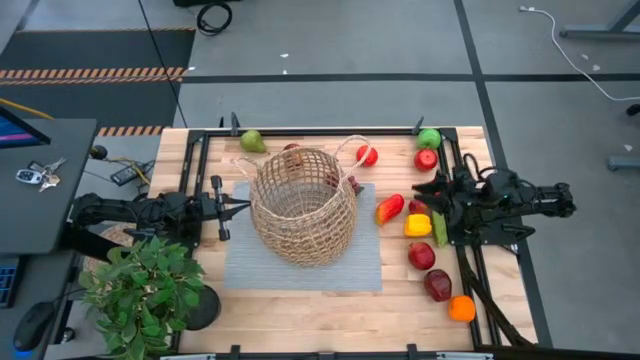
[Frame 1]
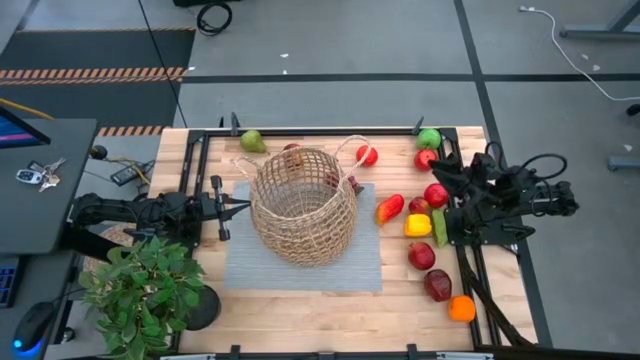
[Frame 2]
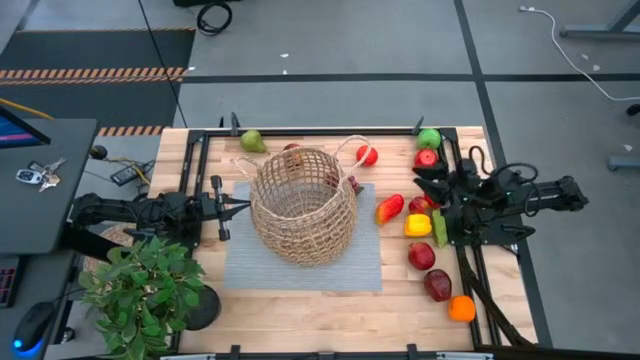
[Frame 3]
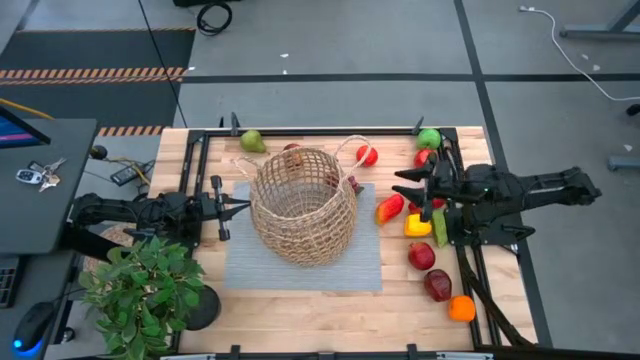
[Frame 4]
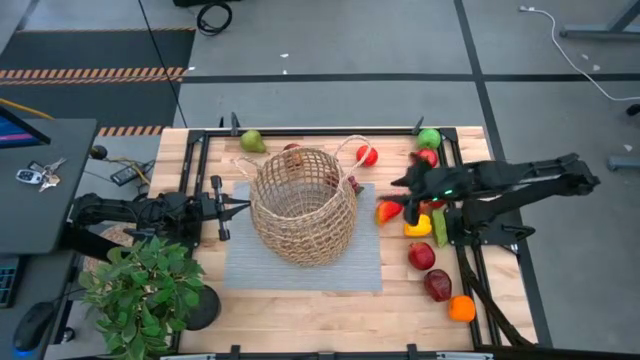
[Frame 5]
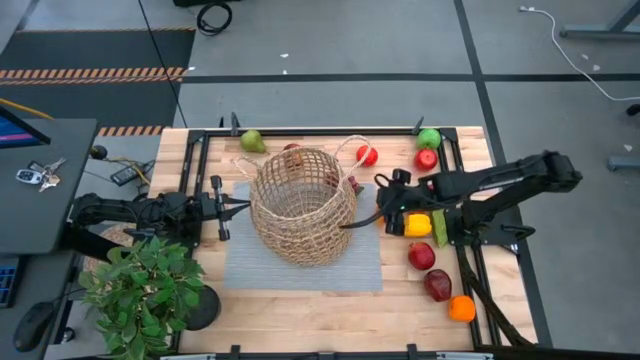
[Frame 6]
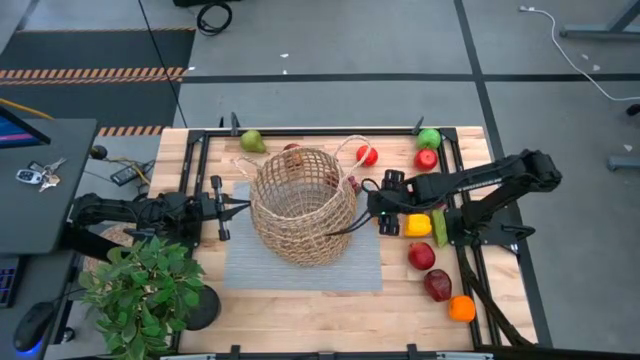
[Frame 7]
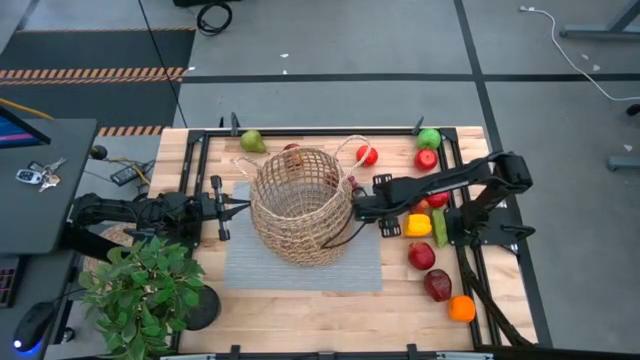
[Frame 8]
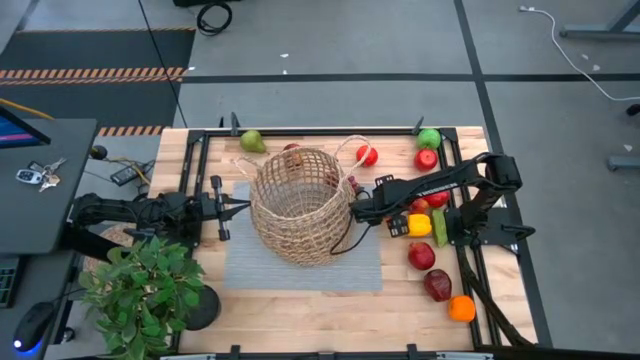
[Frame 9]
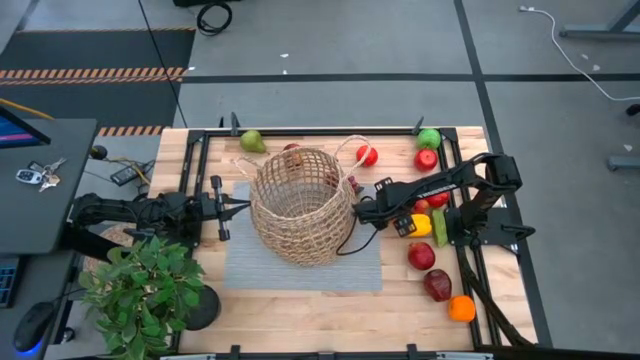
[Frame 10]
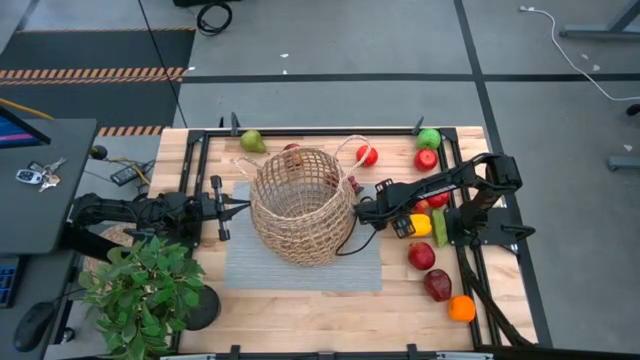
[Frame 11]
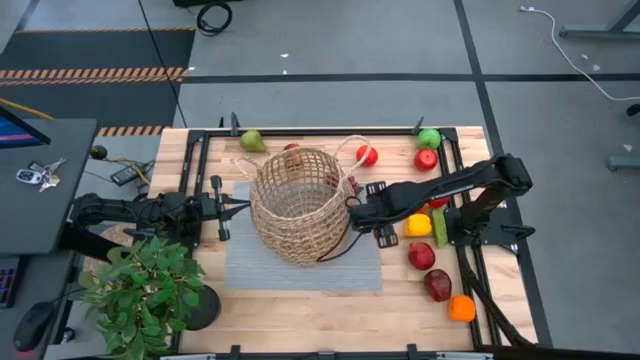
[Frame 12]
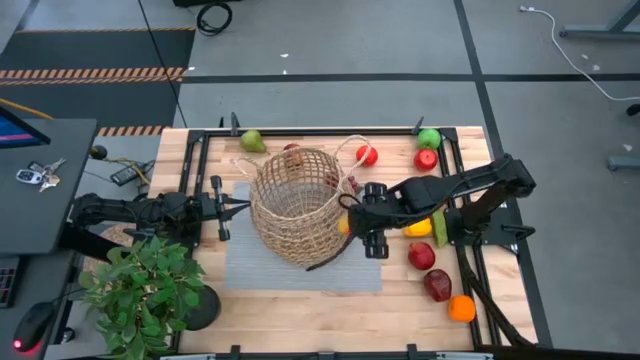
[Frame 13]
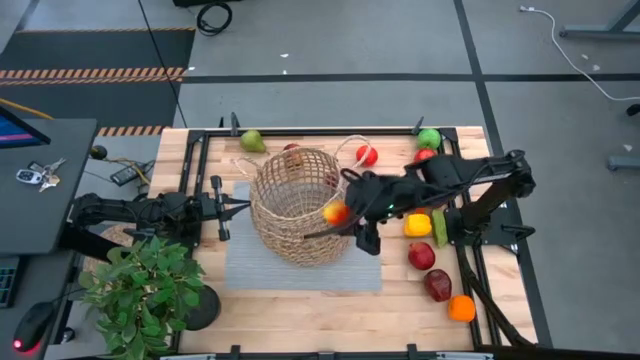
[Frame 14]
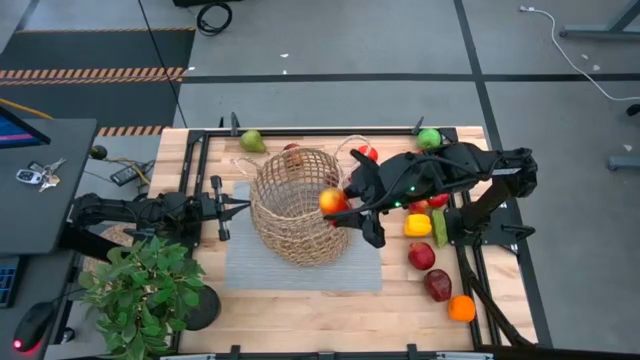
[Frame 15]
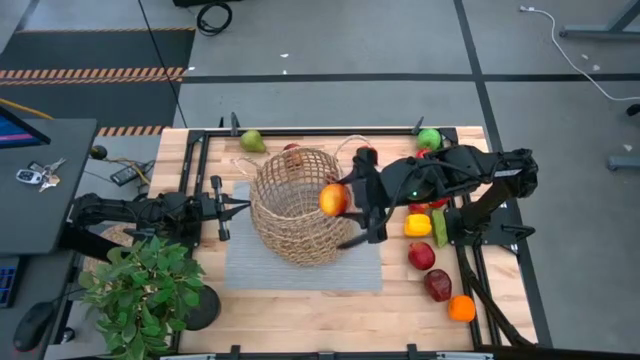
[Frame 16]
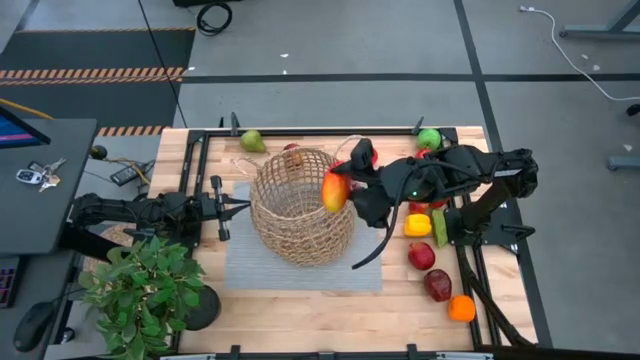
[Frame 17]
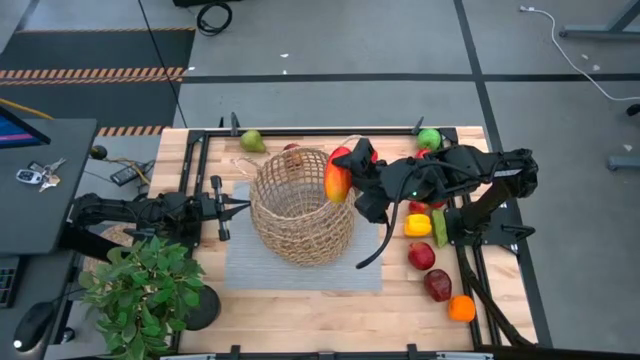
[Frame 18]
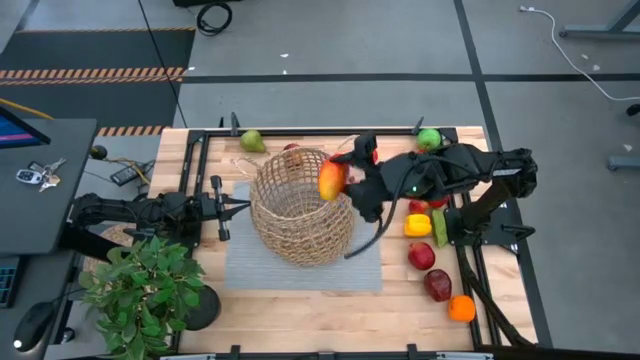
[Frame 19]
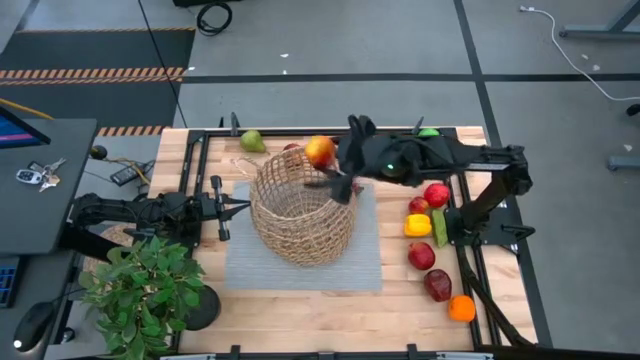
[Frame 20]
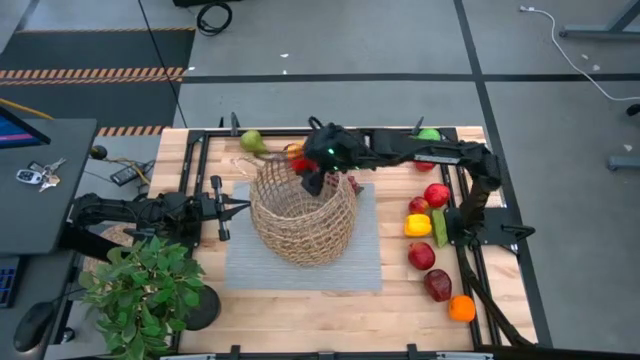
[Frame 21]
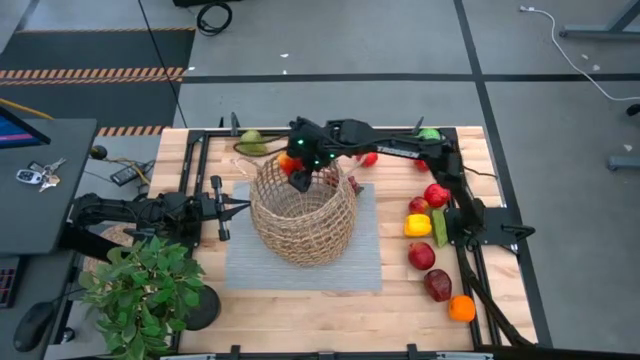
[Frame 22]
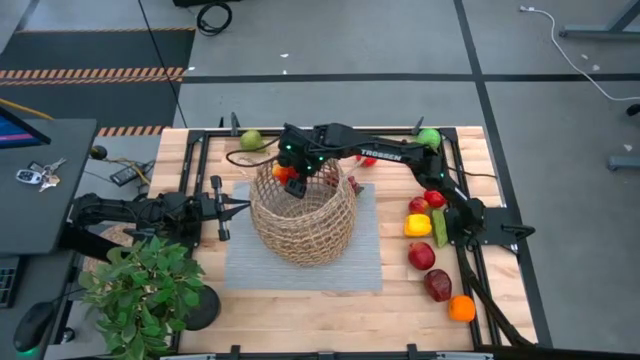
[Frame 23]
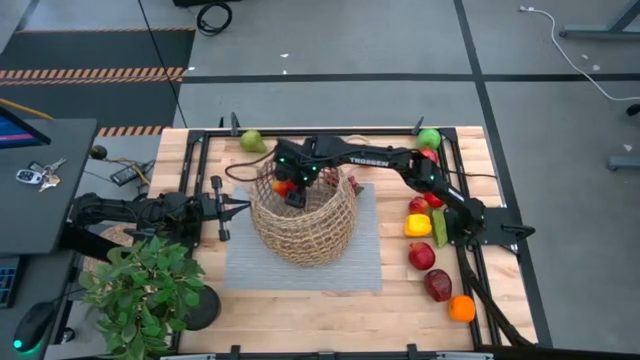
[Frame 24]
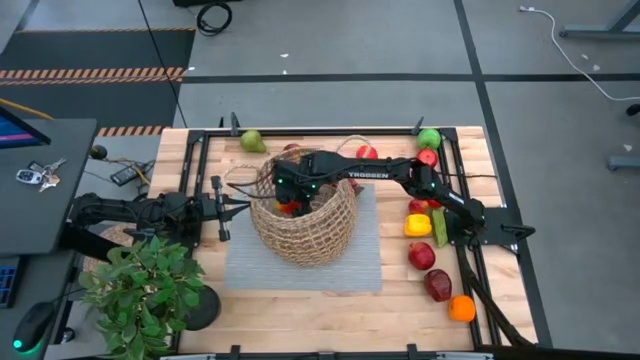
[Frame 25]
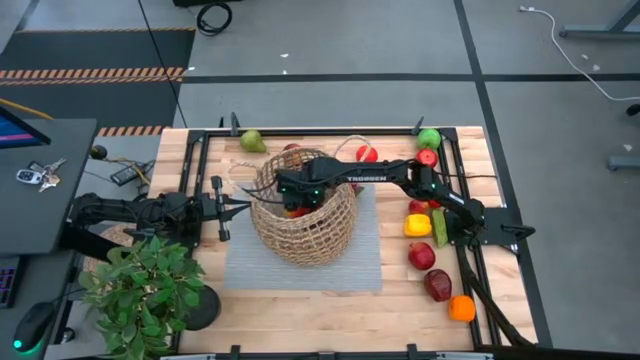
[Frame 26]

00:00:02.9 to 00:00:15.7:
Task: Build produce basket
Put the red mango into the brown basket

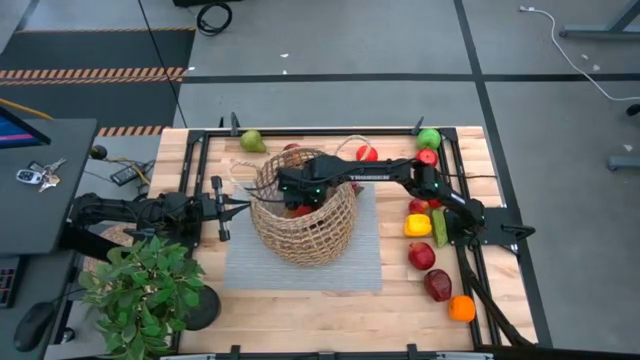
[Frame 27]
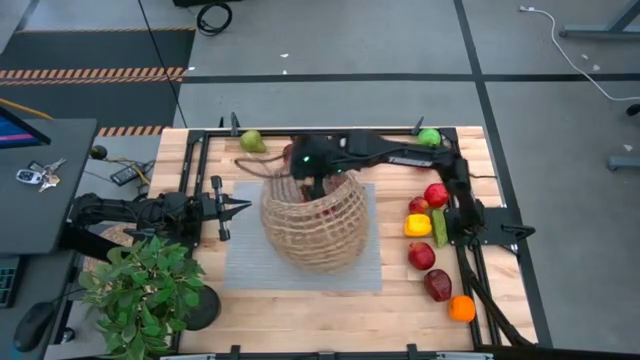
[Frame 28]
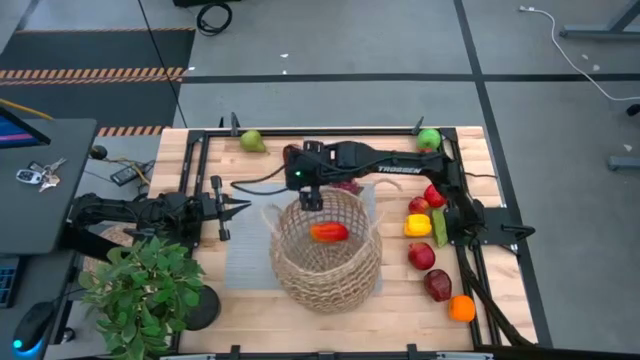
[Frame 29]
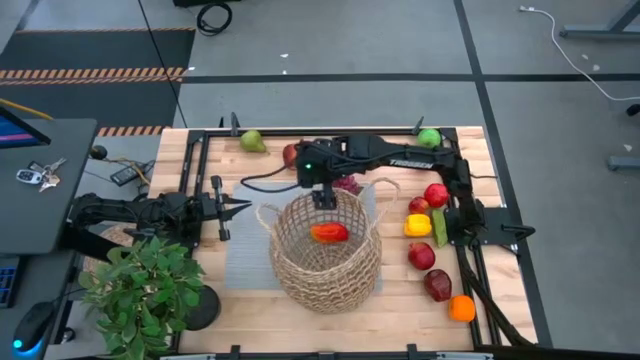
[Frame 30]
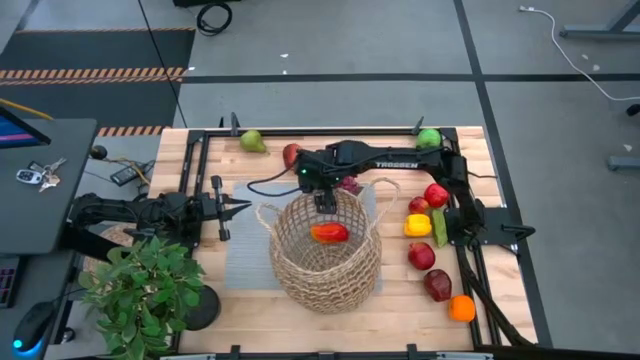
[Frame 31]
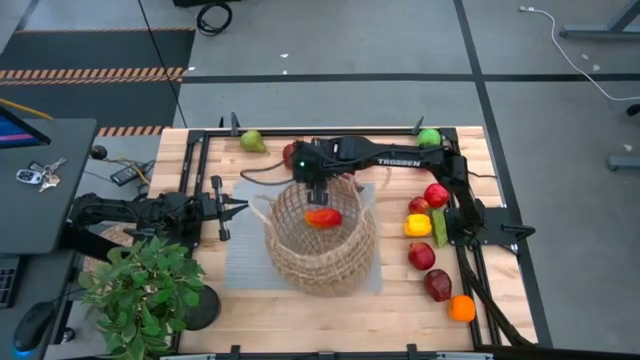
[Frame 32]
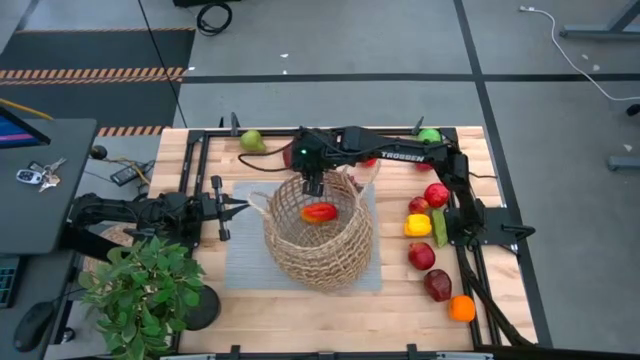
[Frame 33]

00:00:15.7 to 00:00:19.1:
Adjust the brown basket

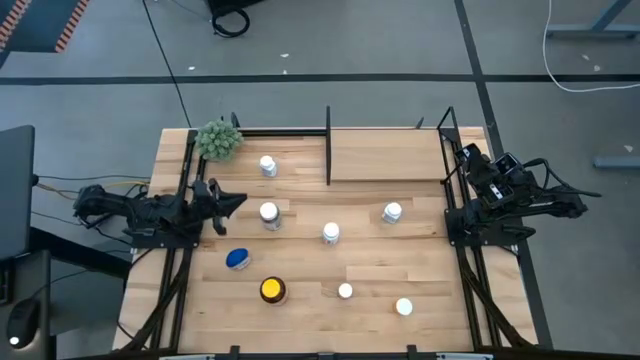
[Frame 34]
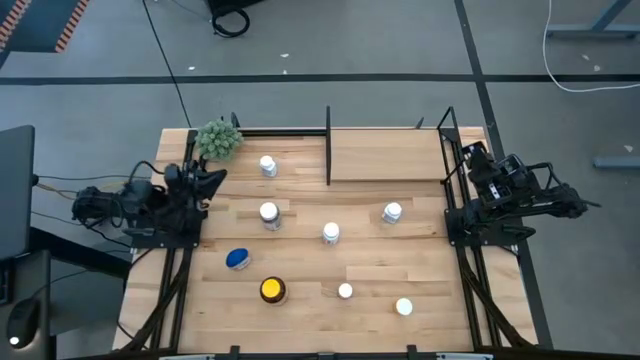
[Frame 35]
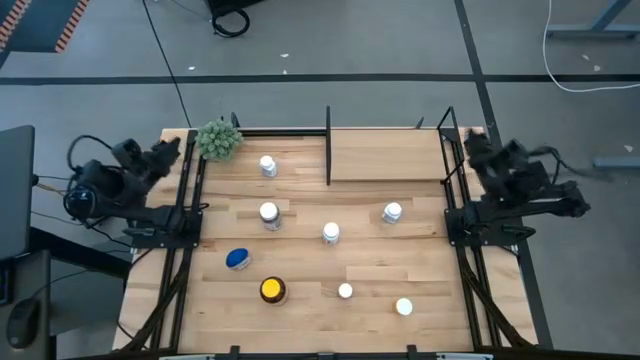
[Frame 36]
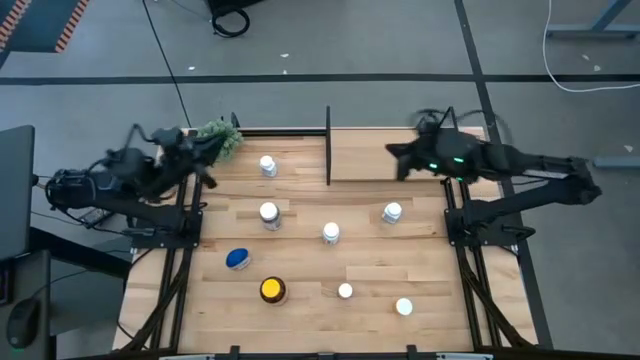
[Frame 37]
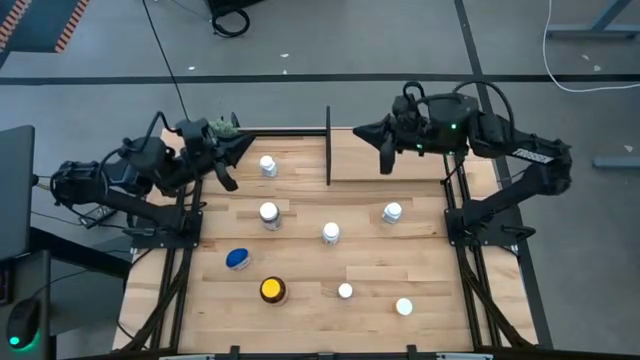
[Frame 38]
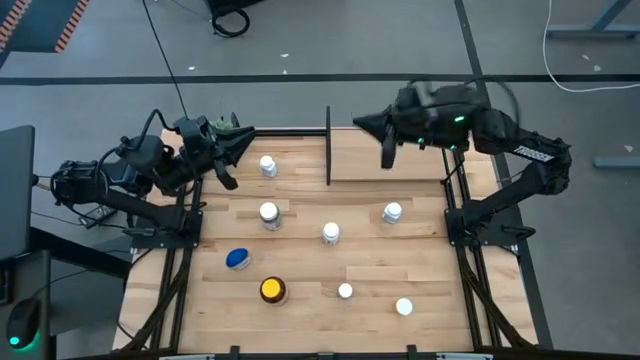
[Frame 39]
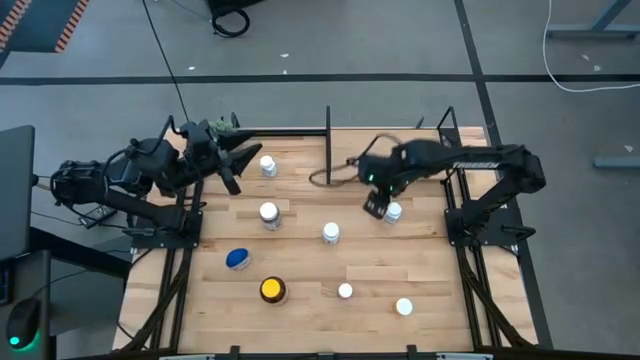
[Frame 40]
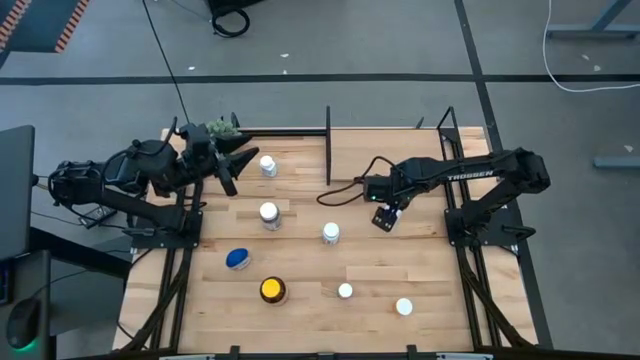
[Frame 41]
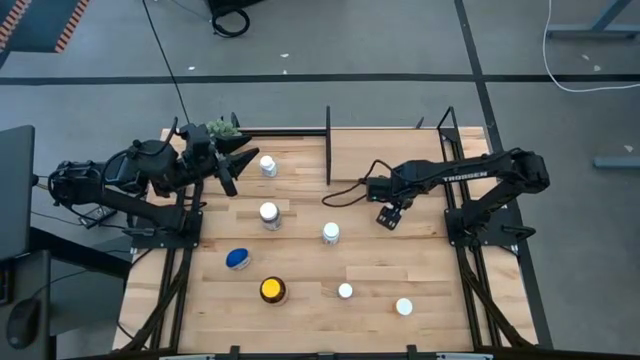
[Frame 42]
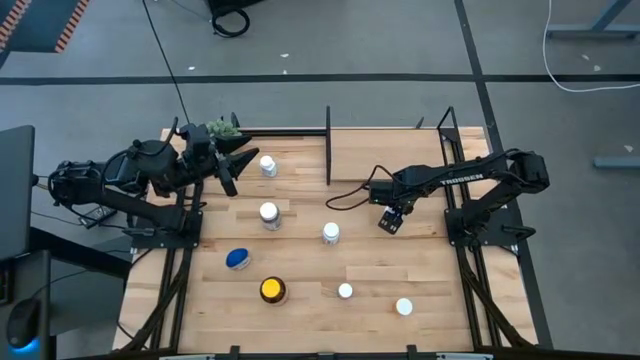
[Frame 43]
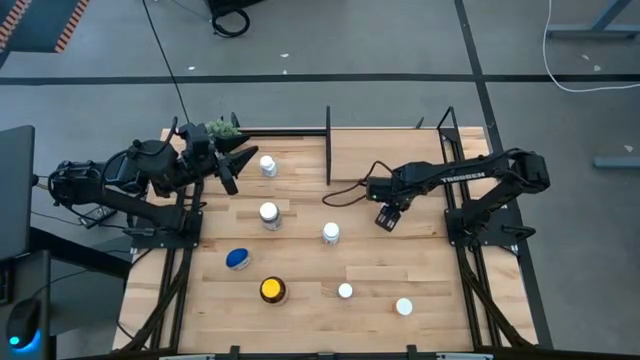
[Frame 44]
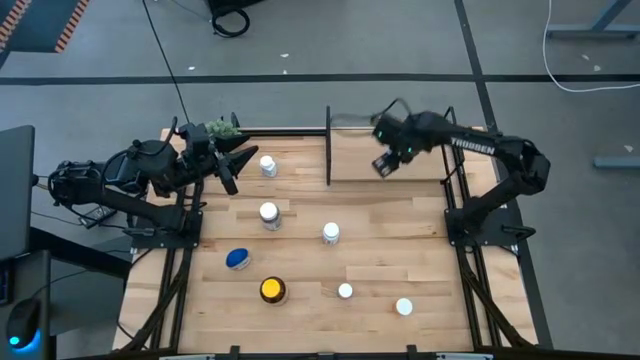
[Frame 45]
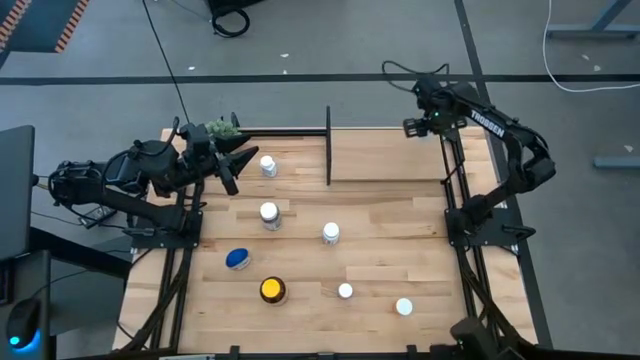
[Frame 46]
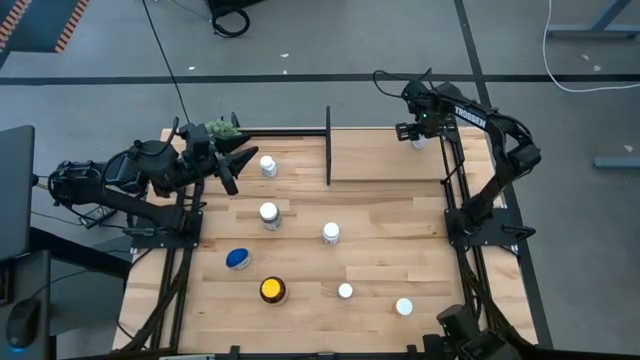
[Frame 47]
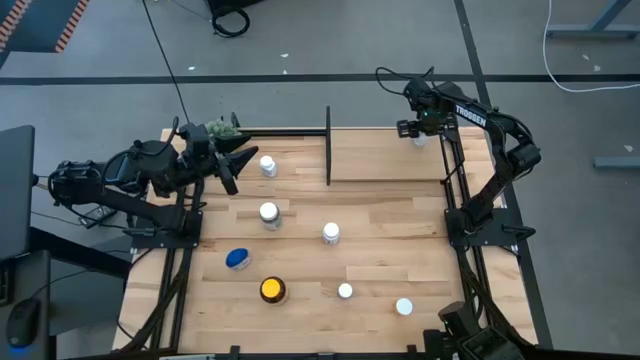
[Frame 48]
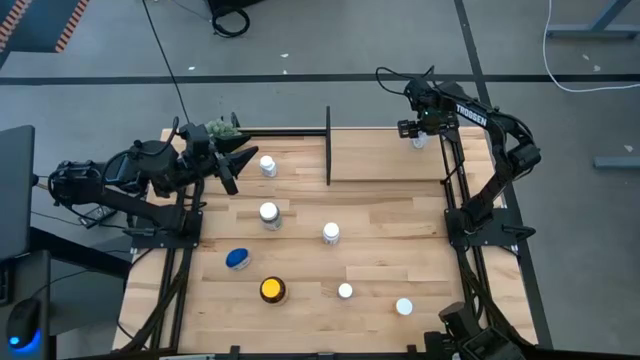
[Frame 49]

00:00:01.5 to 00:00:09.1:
Task: Pick and place medicine bottles onto shelf by color
Put the white blue pill bottle on the shelf
